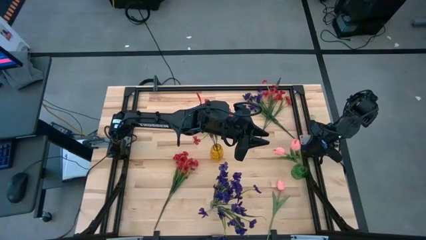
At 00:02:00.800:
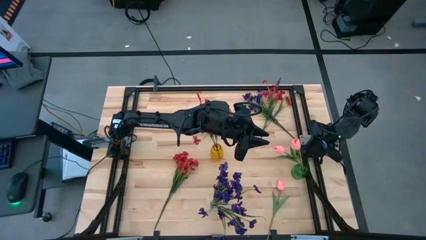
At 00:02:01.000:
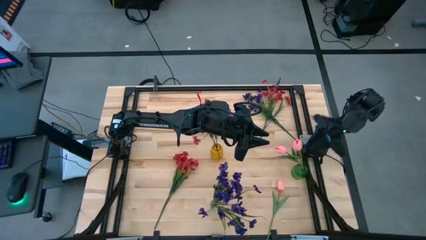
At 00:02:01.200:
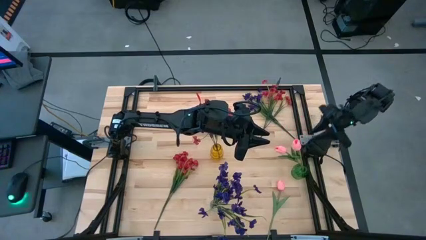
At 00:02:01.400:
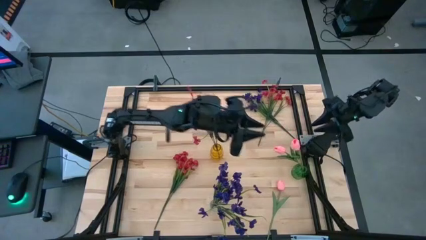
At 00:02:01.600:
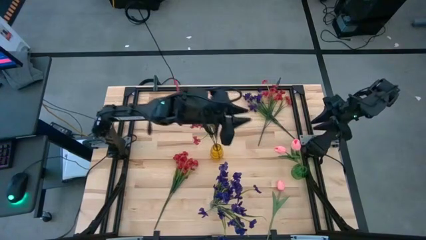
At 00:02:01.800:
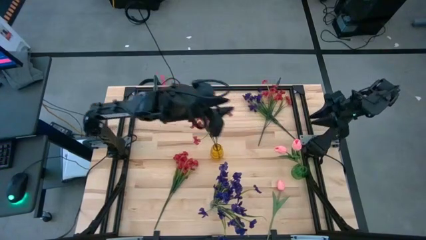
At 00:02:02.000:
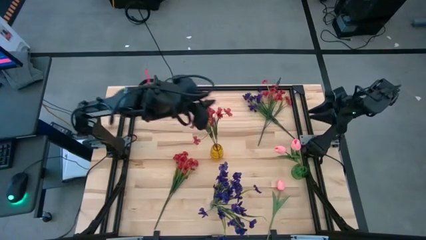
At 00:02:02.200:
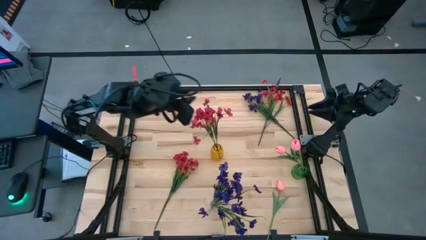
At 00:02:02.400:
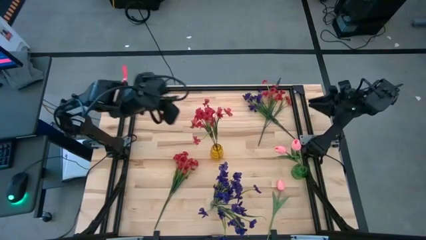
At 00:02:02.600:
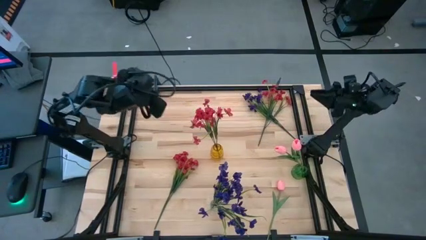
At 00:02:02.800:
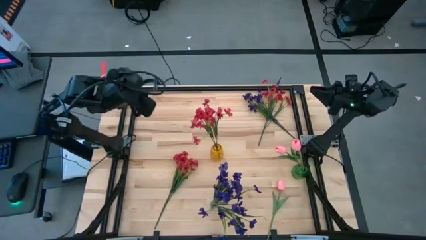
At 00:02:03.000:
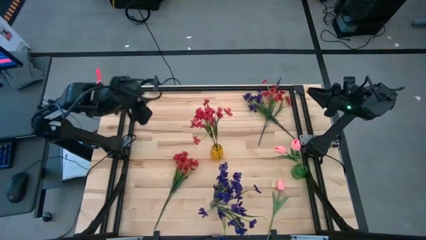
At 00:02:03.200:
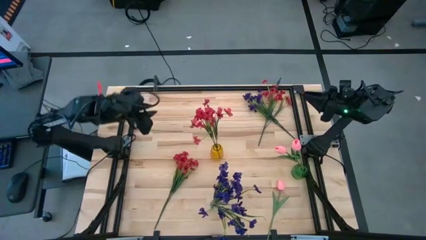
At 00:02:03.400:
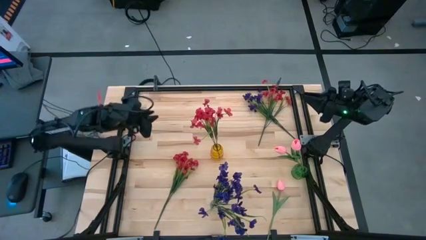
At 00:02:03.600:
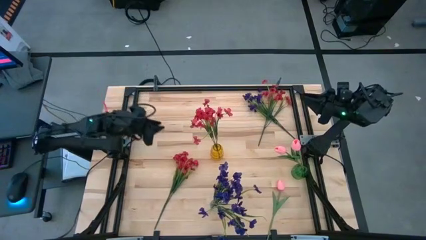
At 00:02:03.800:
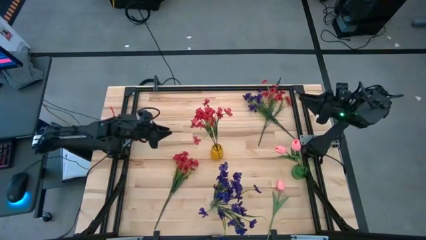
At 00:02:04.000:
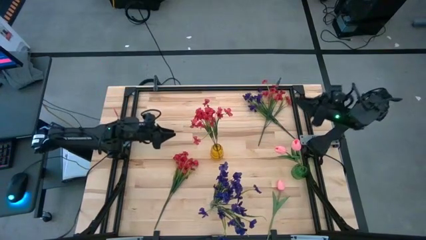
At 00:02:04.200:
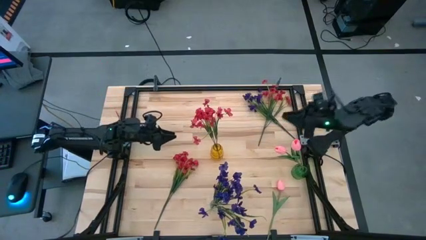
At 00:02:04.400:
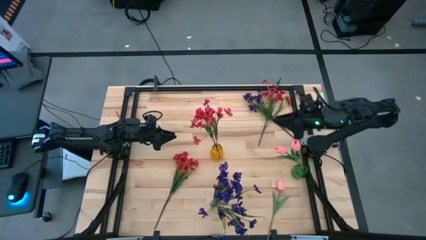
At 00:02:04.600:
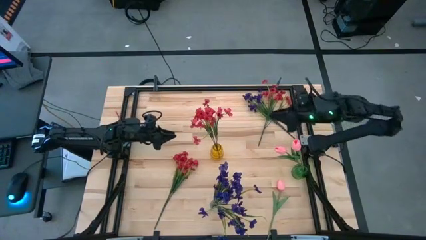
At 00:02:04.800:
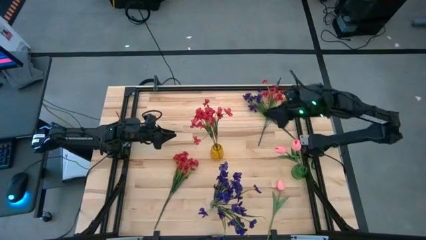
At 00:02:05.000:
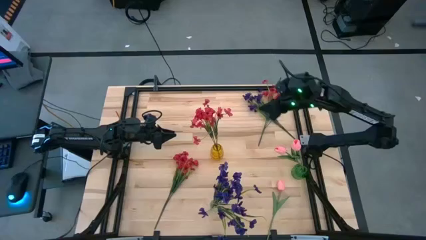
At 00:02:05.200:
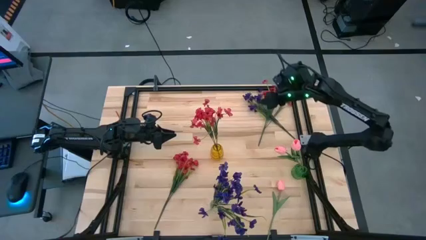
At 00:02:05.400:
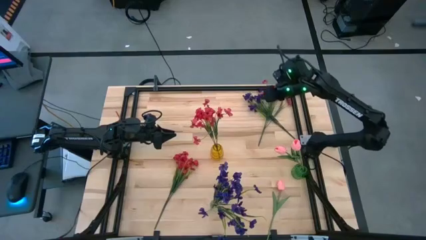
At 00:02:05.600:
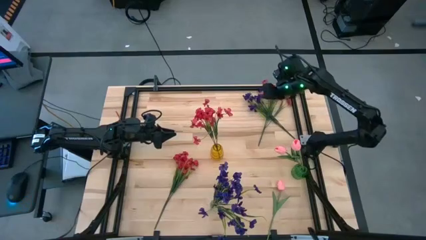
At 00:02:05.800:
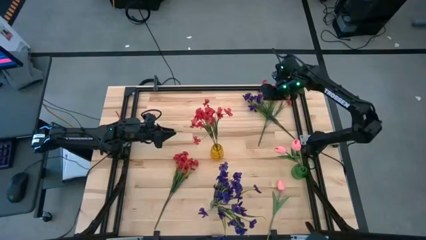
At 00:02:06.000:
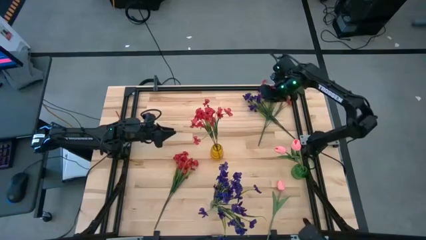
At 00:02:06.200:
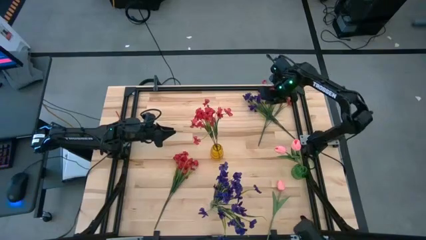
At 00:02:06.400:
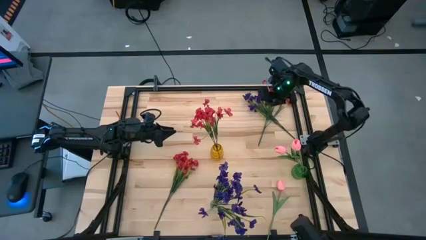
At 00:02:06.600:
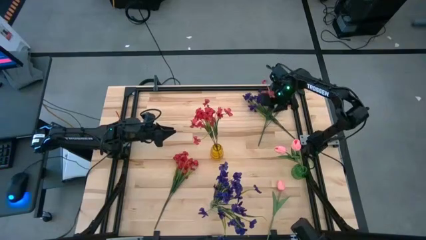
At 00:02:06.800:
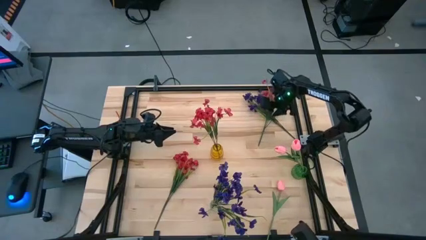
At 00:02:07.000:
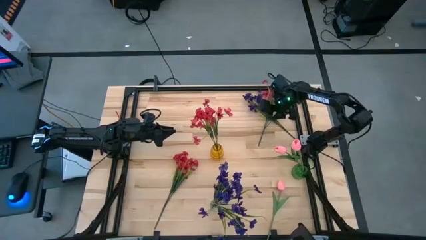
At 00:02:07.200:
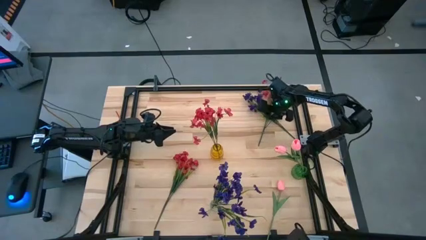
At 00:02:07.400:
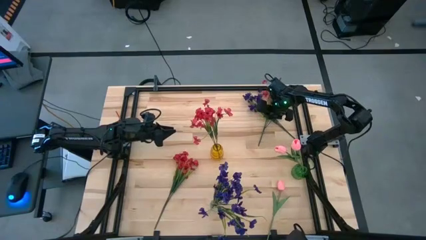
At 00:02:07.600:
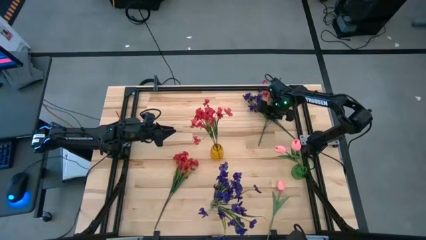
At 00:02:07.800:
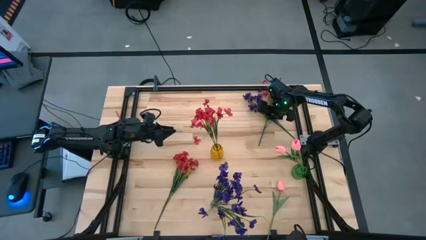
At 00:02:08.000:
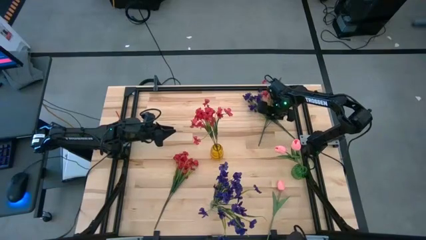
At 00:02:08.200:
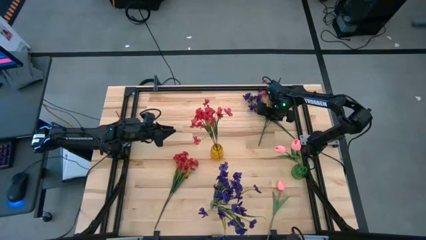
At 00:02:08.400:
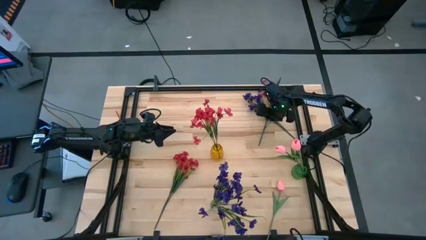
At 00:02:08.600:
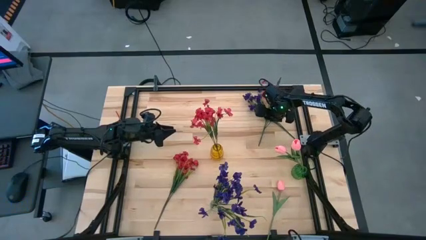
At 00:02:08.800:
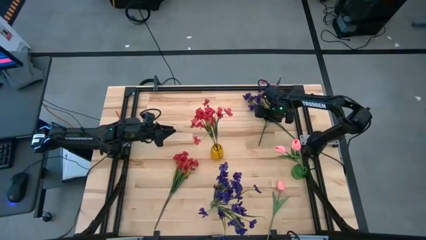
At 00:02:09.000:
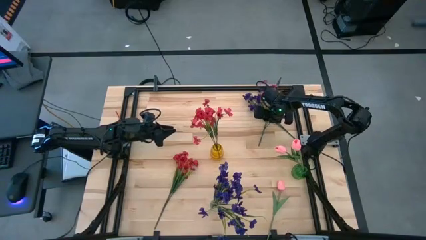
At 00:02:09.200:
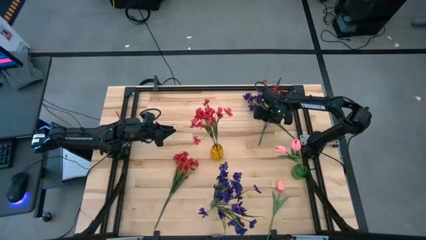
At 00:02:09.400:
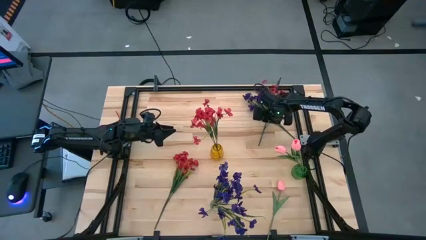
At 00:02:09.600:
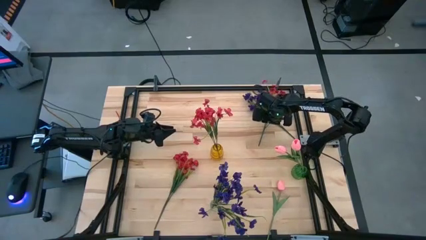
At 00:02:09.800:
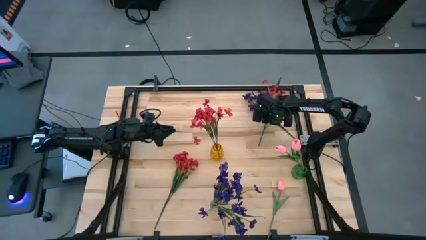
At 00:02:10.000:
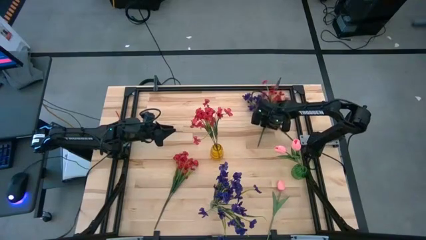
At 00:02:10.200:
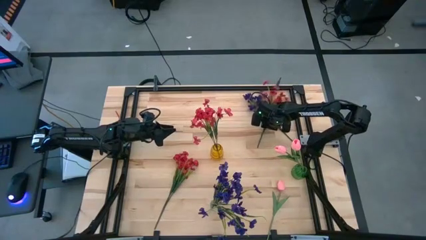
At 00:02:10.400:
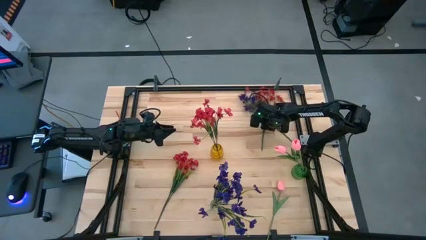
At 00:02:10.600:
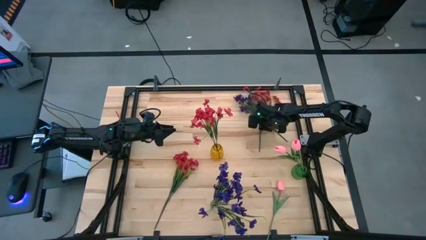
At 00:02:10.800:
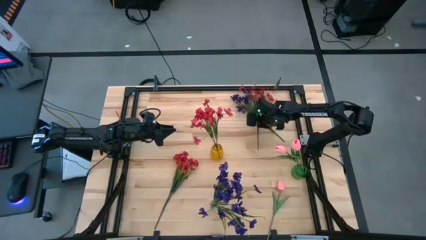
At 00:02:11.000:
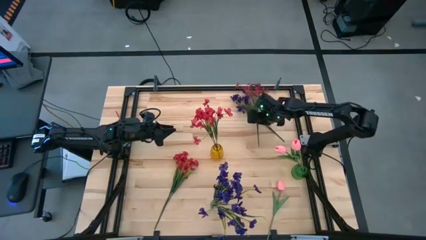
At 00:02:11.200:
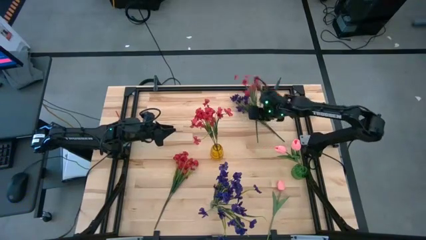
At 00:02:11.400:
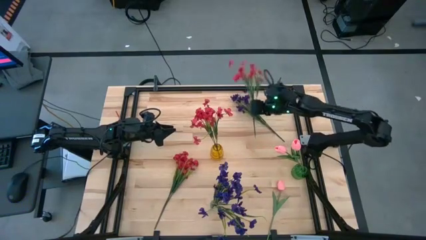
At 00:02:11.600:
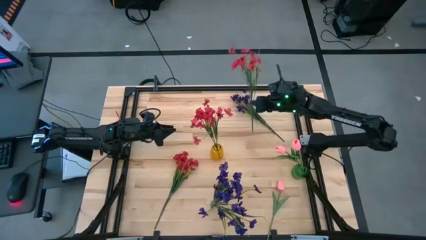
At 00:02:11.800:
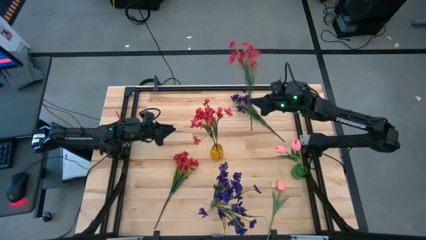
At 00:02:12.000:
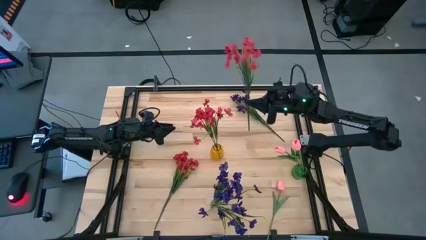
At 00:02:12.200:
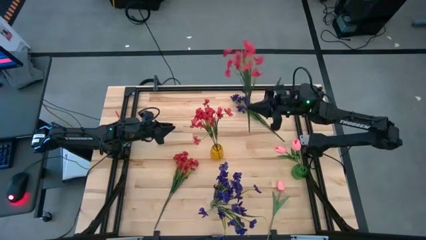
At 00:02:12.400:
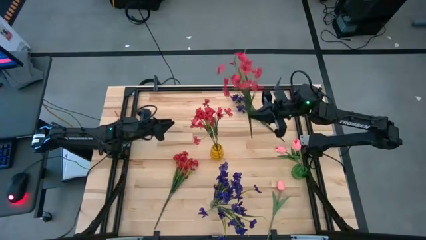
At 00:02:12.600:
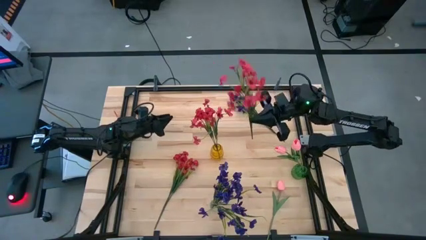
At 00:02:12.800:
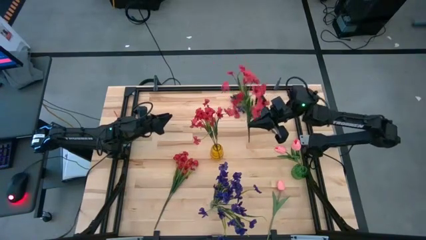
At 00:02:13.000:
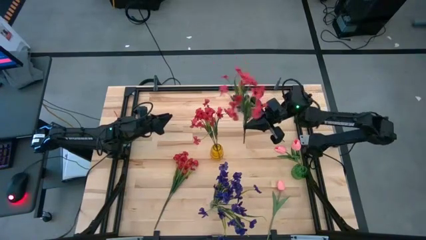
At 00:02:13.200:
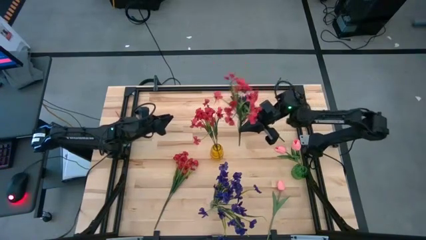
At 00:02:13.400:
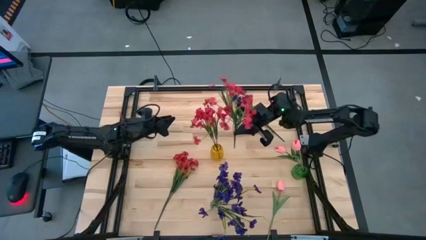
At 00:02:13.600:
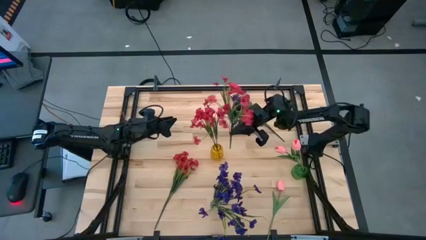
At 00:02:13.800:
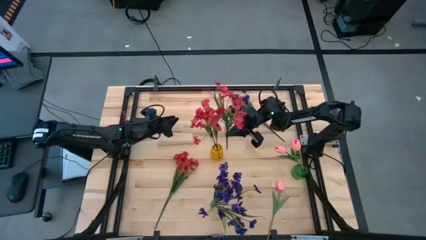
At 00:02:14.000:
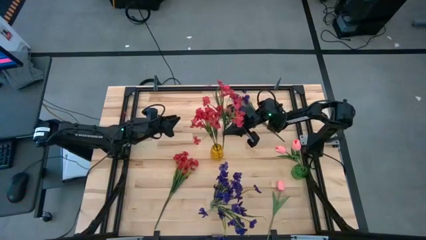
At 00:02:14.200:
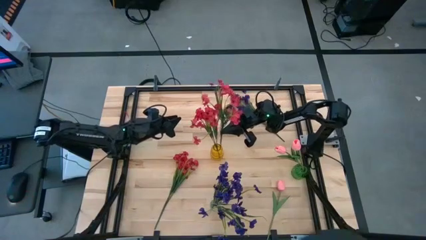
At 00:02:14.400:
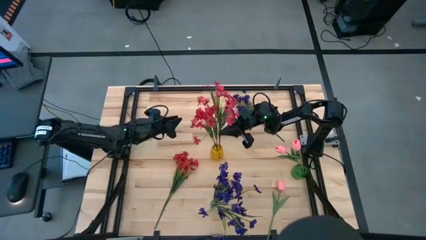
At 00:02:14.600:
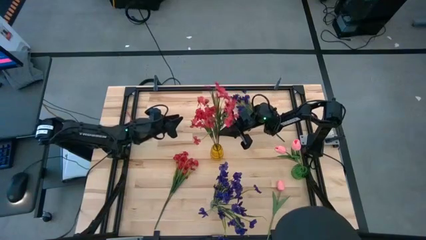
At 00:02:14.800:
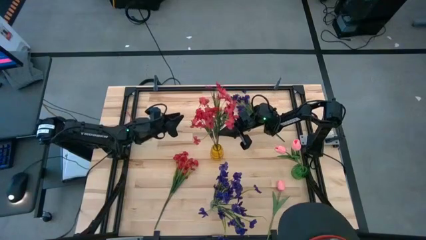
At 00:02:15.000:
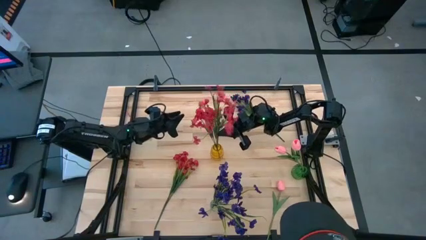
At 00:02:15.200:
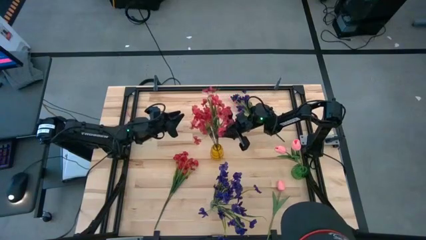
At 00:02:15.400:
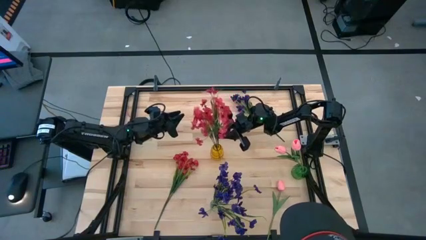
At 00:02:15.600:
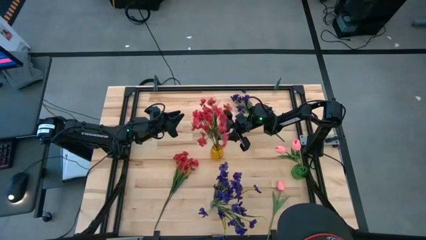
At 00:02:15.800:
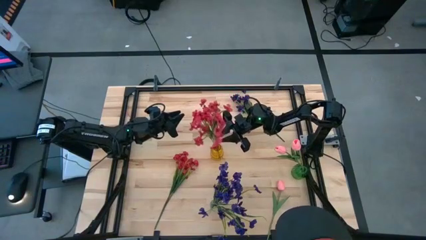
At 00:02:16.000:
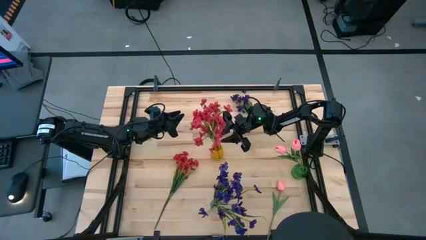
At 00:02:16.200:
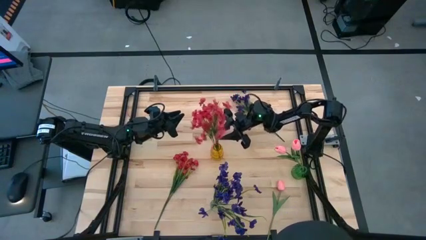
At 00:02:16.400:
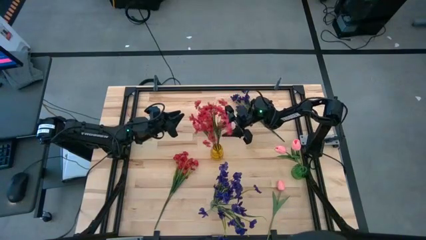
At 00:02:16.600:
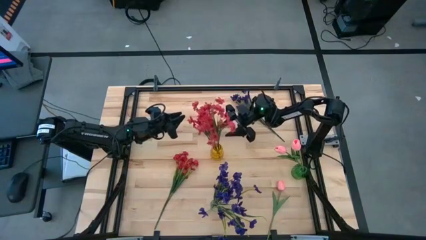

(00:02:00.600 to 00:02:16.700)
Task: Sort flowers into vase by color
Put the top red flower into the yellow vase
